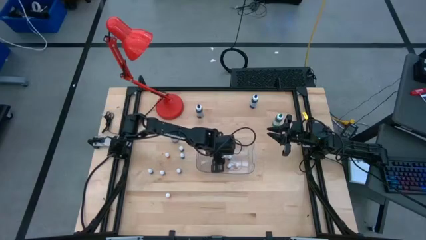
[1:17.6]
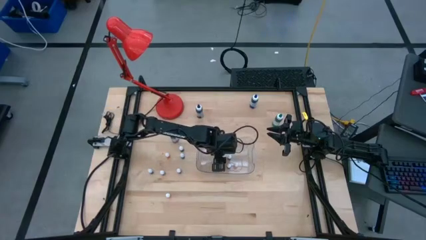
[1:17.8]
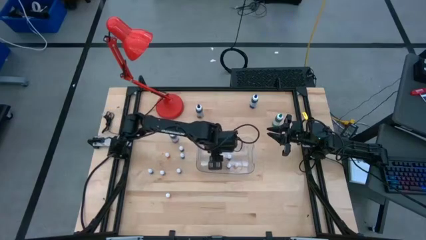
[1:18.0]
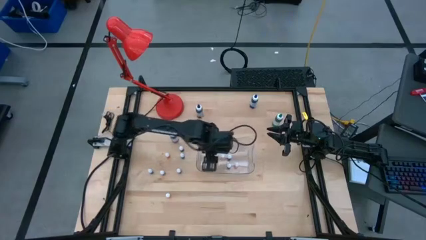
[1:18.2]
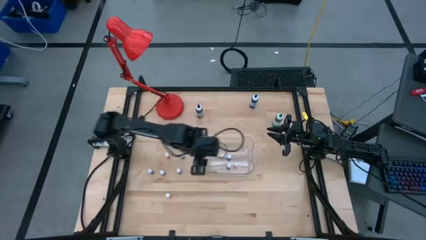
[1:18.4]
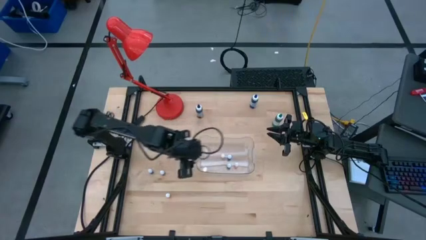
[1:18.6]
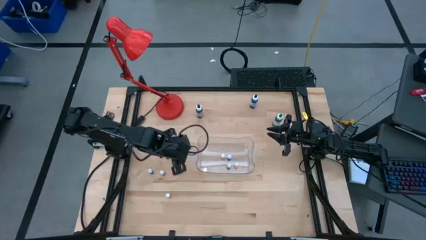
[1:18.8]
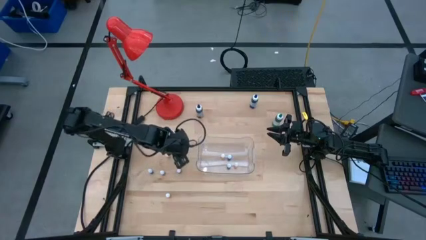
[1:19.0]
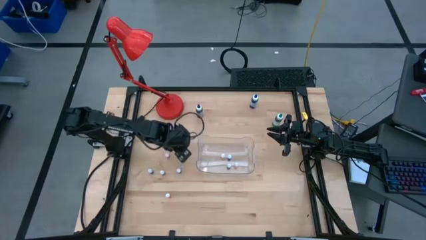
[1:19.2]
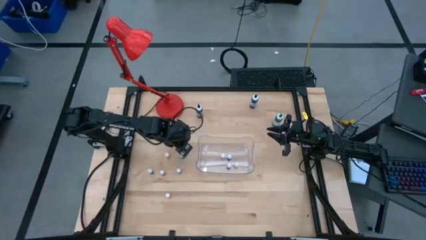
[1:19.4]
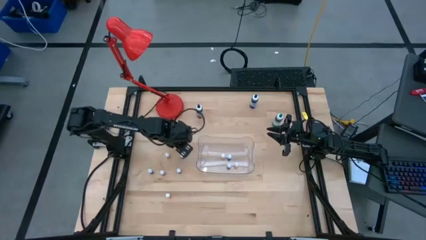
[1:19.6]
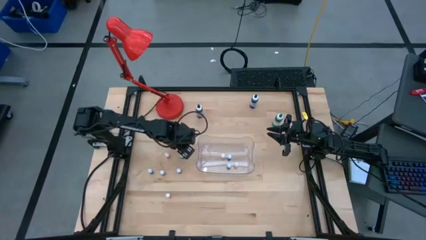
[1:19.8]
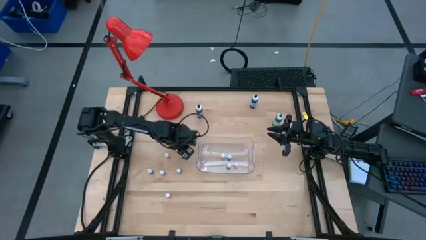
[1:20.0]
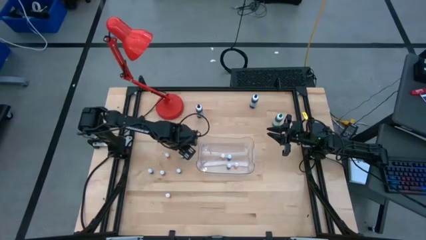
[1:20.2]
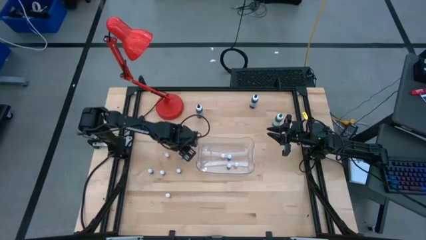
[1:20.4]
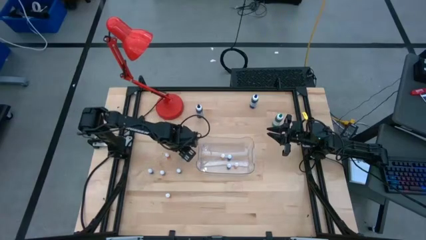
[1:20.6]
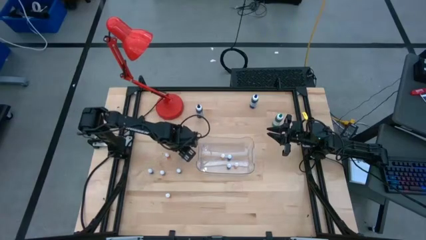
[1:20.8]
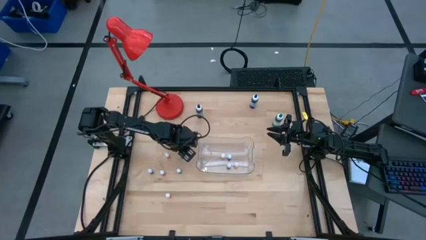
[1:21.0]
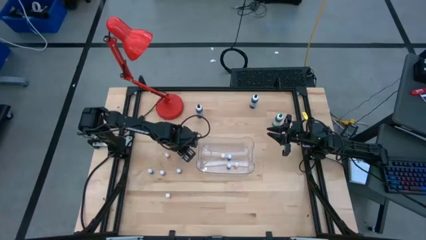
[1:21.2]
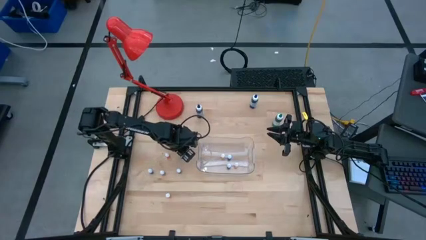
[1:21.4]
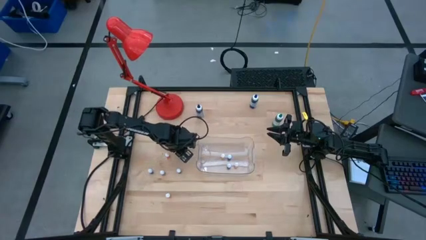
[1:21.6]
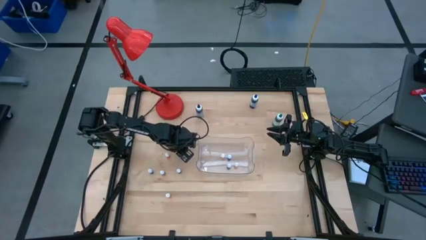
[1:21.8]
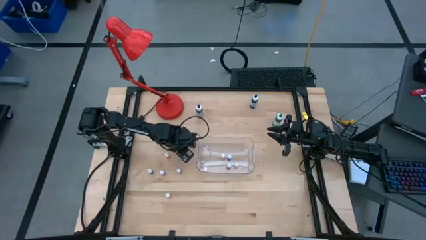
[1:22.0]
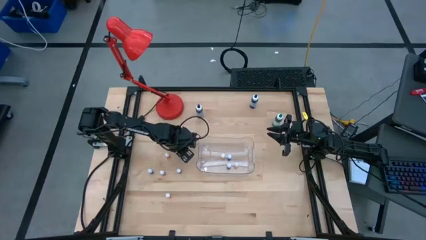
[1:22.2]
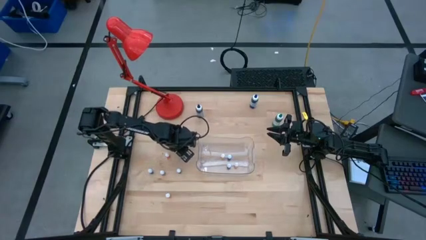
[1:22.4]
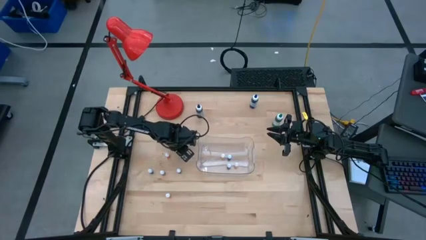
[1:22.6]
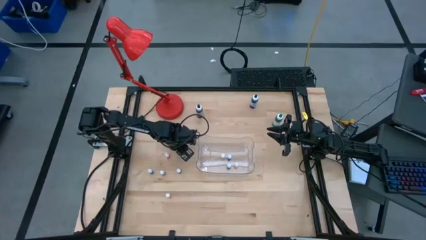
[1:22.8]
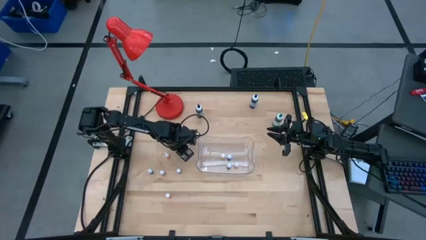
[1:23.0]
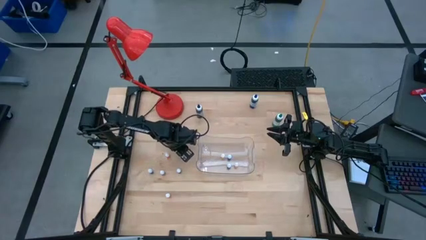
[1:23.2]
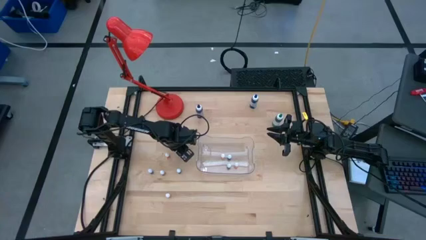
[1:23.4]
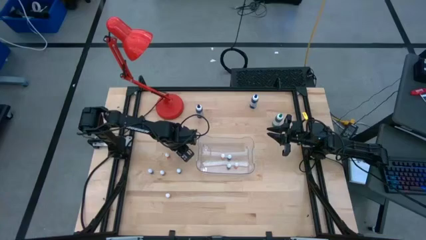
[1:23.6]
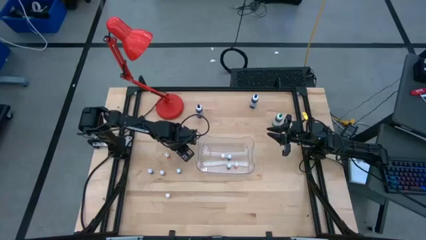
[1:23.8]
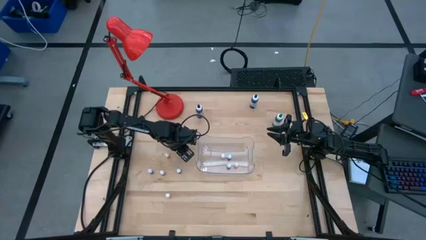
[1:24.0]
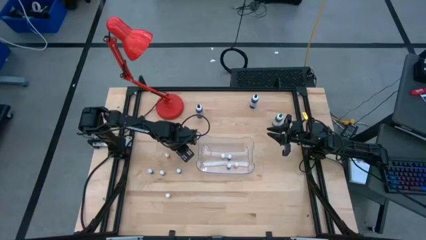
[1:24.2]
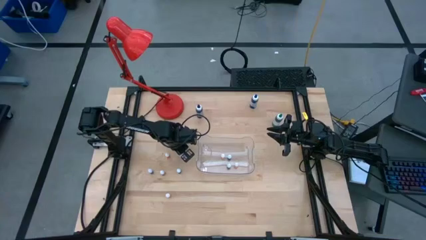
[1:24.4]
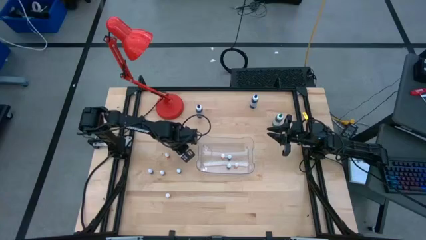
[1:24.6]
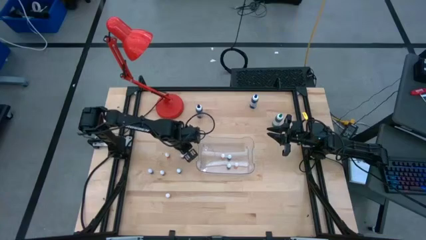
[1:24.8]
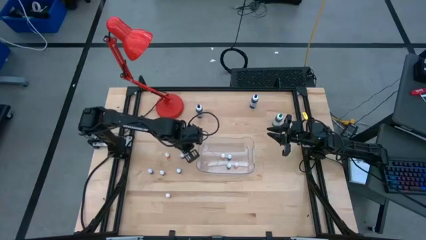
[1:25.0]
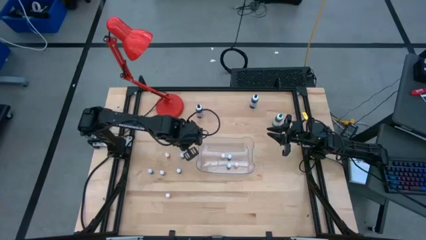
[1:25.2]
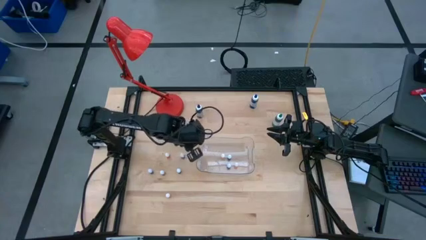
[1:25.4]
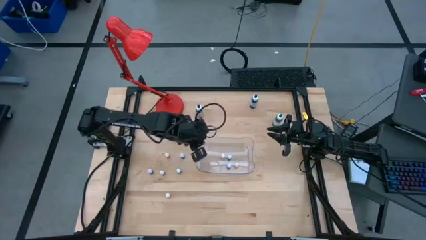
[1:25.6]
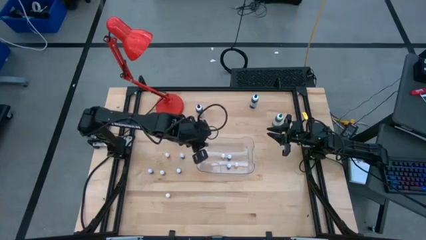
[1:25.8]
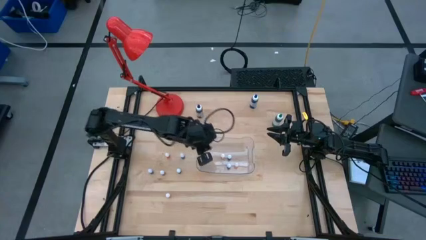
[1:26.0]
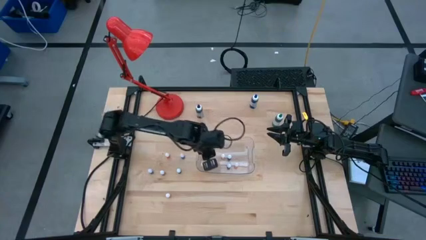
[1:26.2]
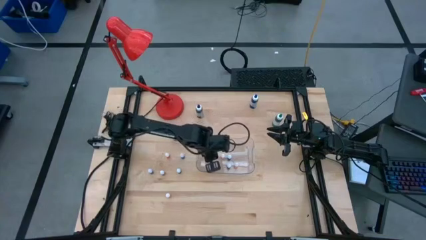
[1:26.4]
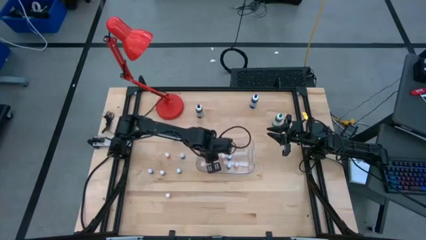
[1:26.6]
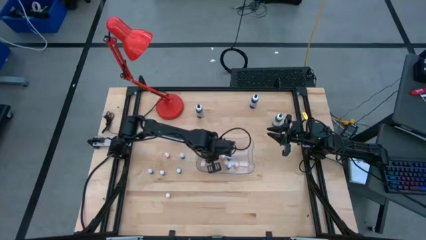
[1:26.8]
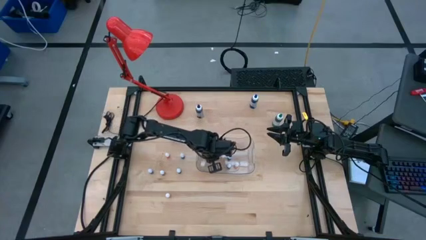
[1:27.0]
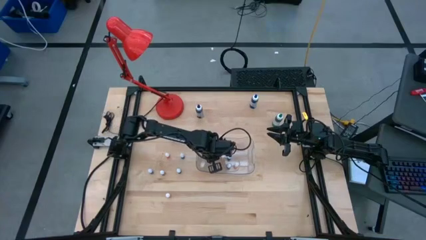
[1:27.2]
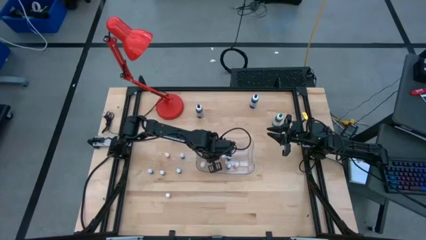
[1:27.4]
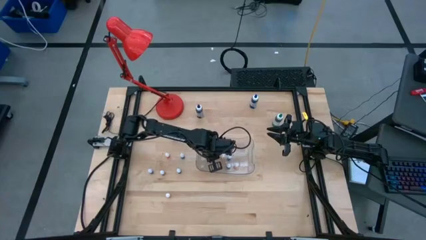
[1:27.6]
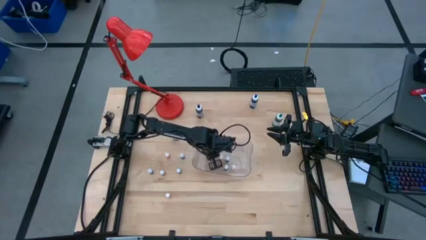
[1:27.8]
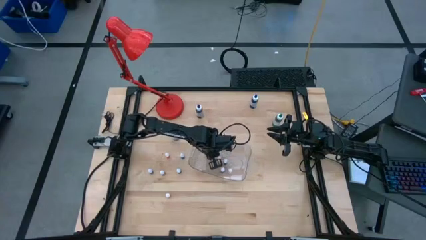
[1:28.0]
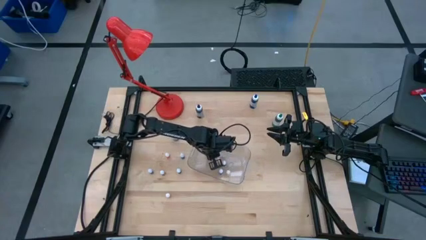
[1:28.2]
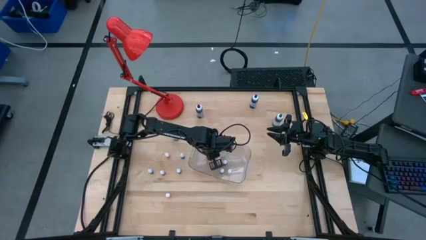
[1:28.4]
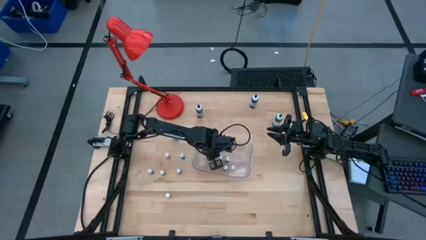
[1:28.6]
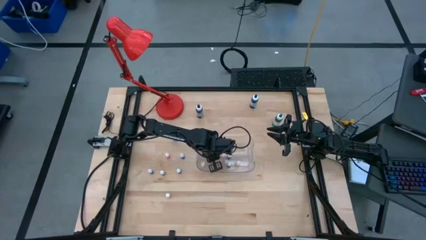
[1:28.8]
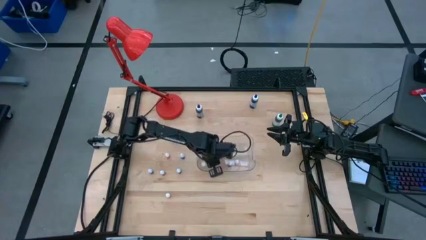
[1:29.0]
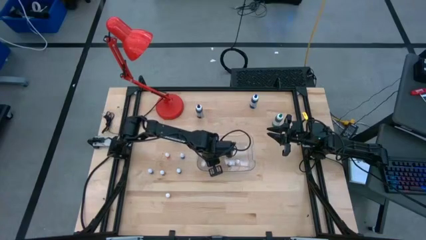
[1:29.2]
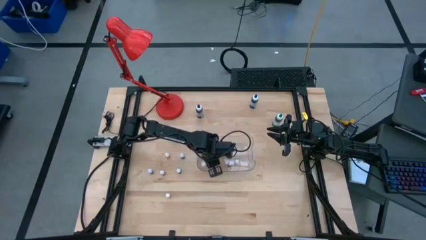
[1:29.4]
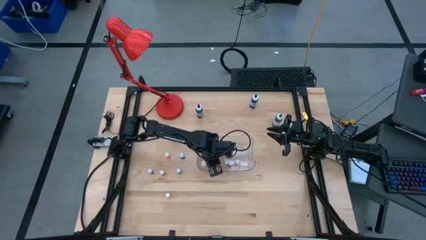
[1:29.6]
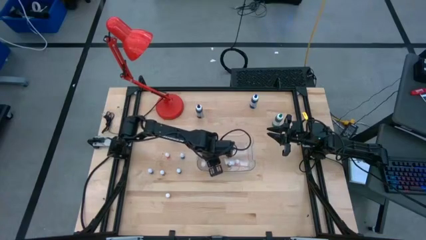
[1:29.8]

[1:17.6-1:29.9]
Task: Pick & Place food coloring
Put the top small red food coloring bottle into the transparent bin
